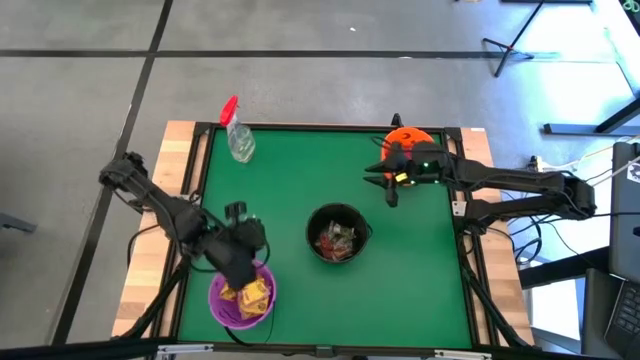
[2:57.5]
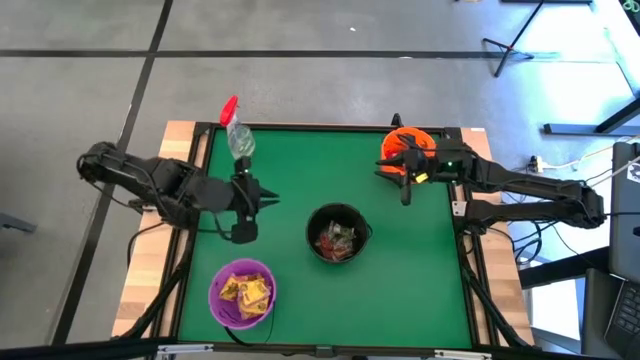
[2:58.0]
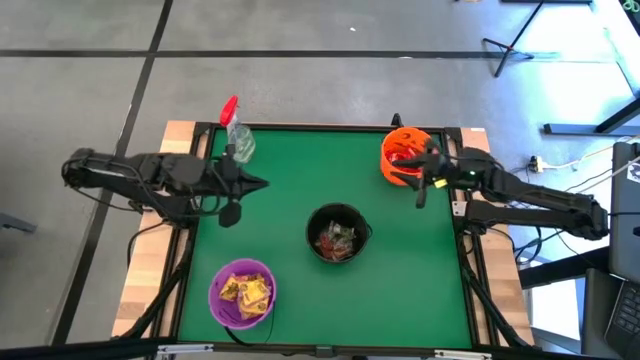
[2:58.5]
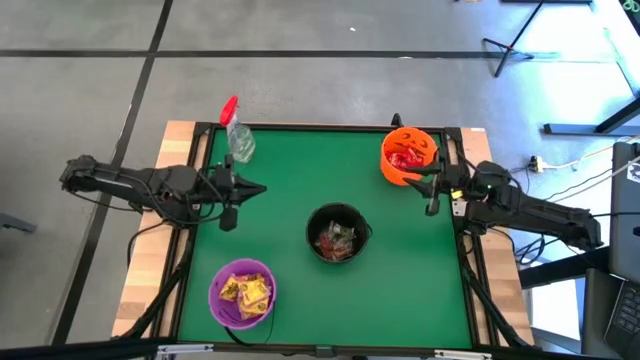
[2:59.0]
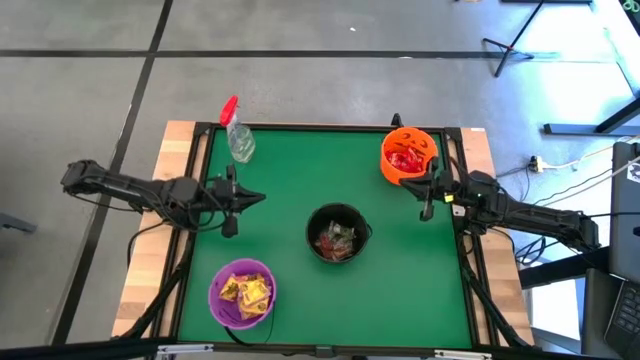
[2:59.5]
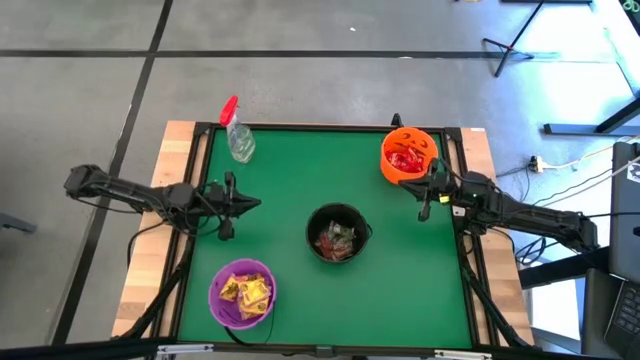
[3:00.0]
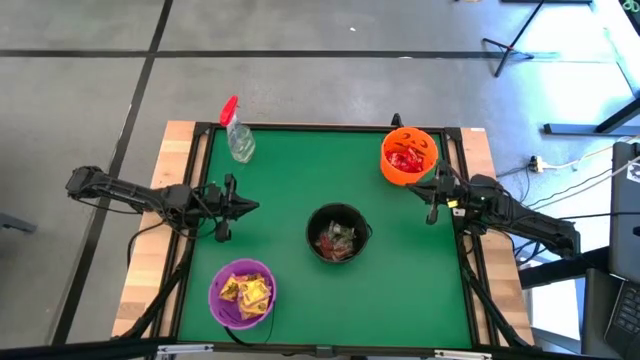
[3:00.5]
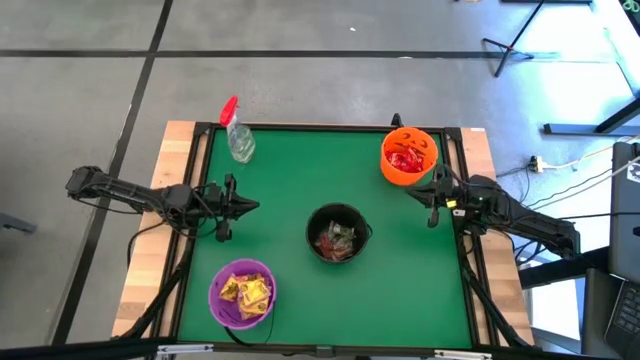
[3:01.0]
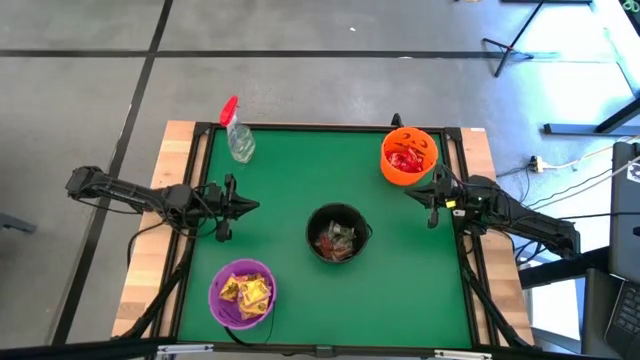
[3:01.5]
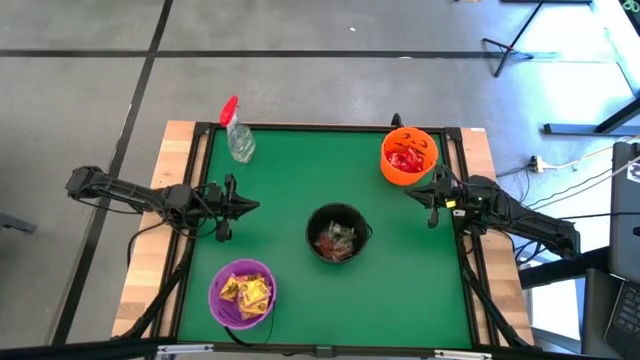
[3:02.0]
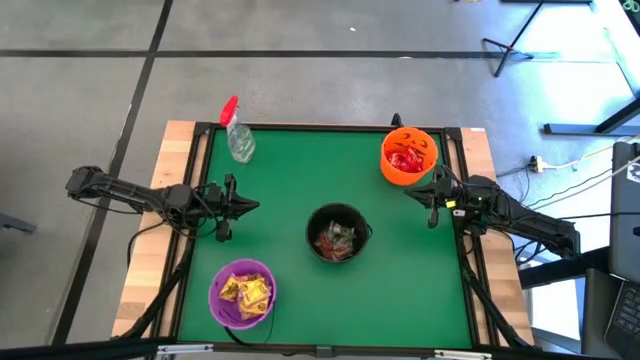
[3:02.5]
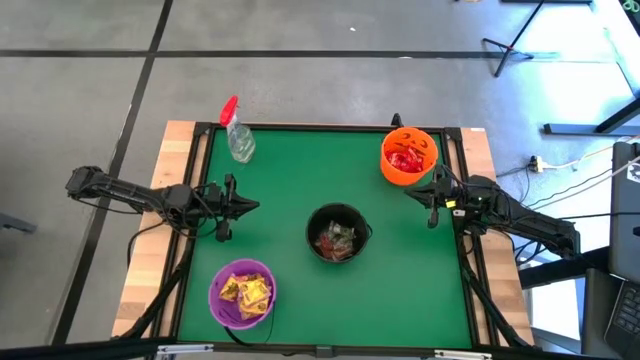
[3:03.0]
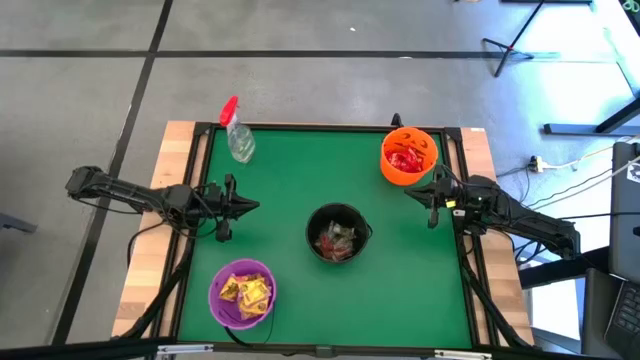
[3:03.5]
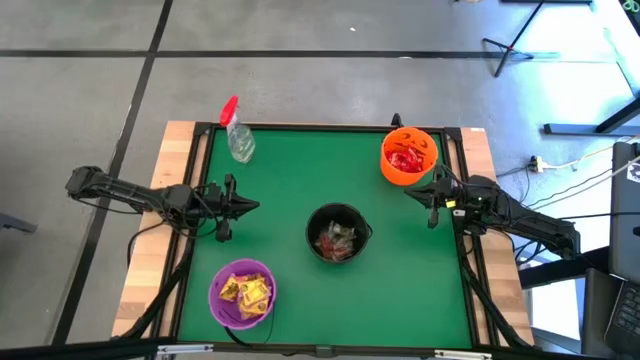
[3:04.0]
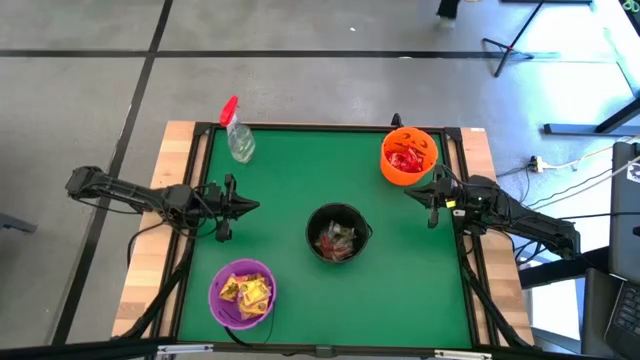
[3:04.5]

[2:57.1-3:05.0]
Task: Sort candy
Return to Home Position

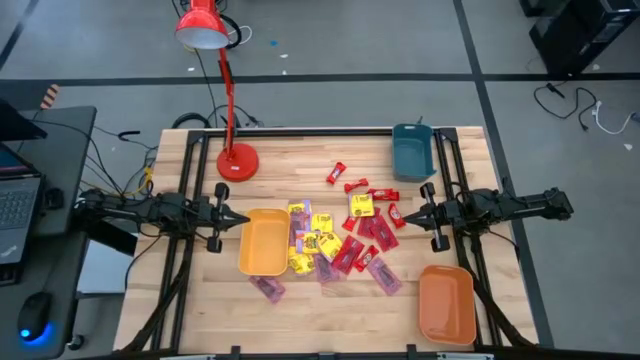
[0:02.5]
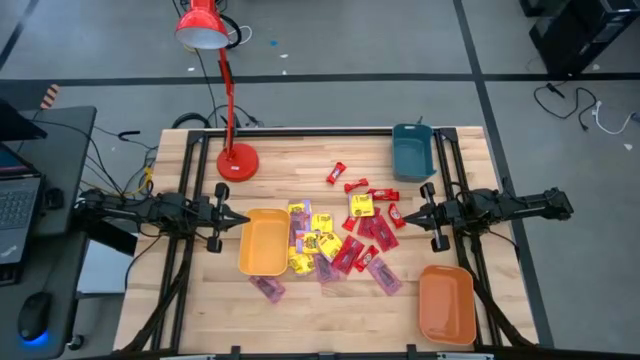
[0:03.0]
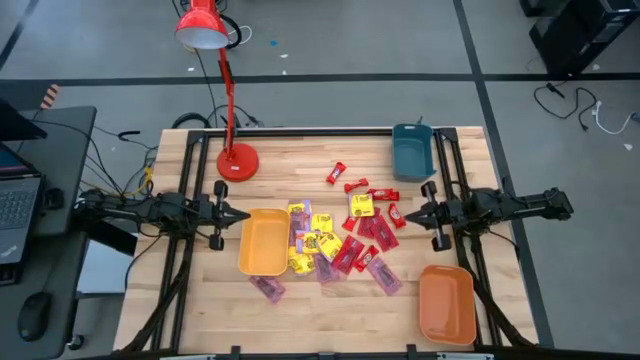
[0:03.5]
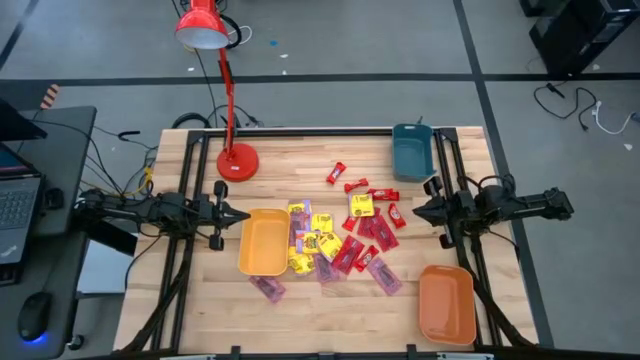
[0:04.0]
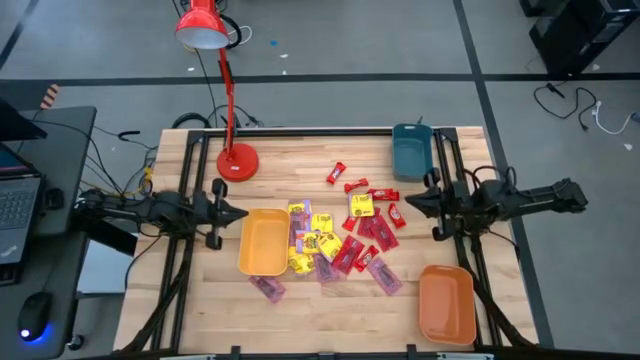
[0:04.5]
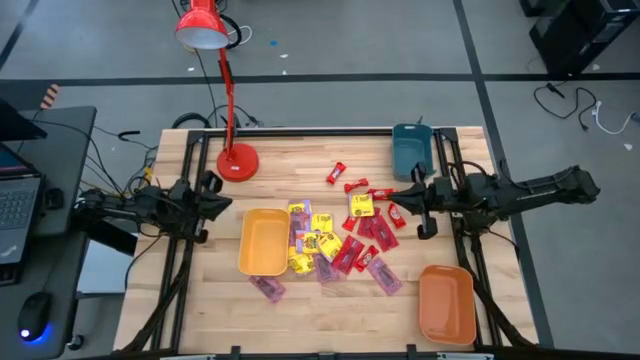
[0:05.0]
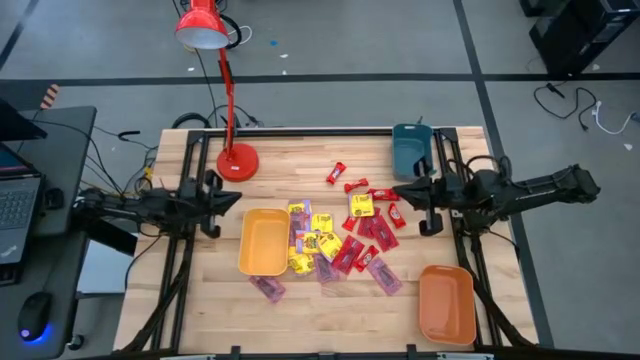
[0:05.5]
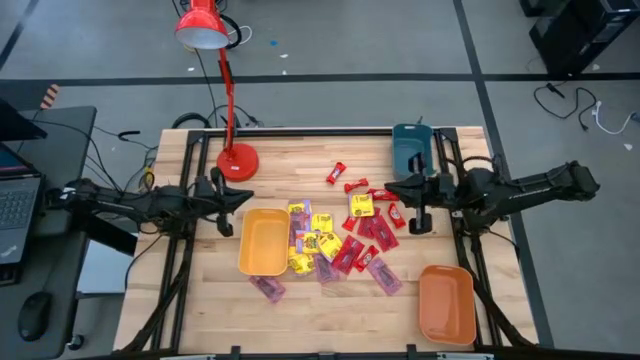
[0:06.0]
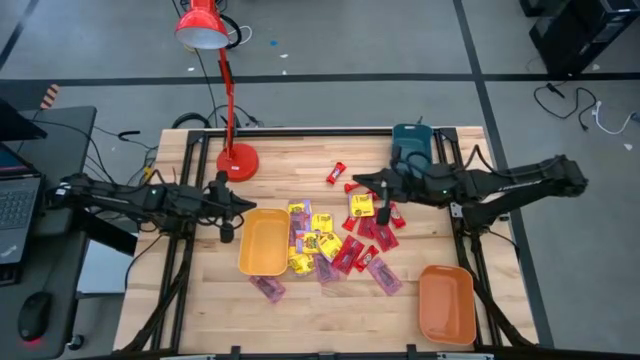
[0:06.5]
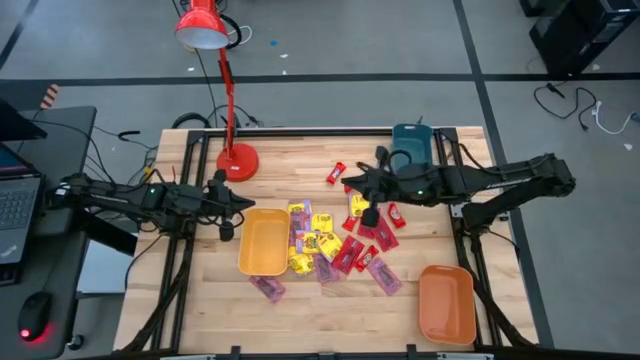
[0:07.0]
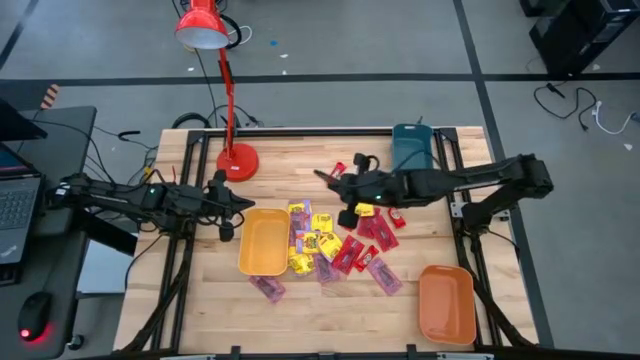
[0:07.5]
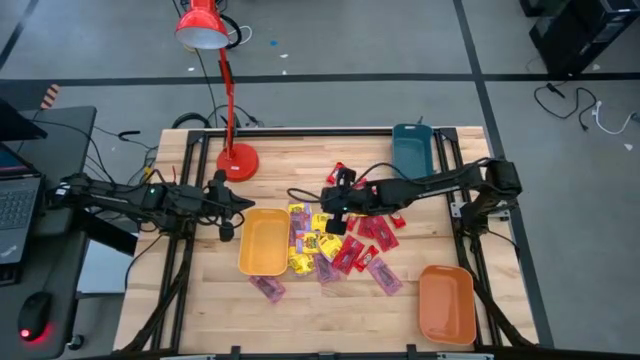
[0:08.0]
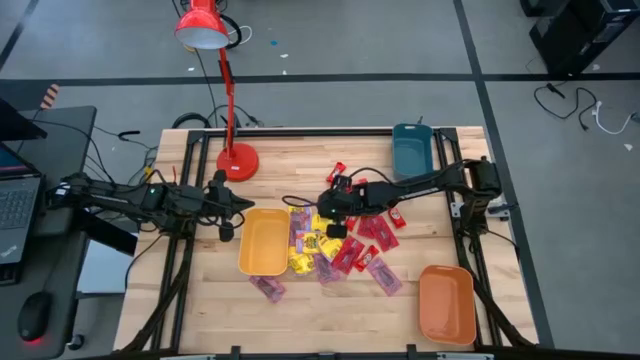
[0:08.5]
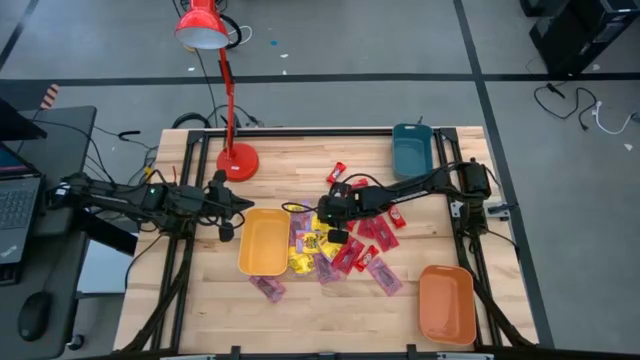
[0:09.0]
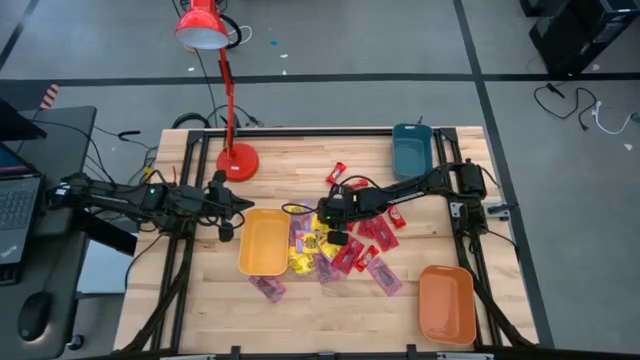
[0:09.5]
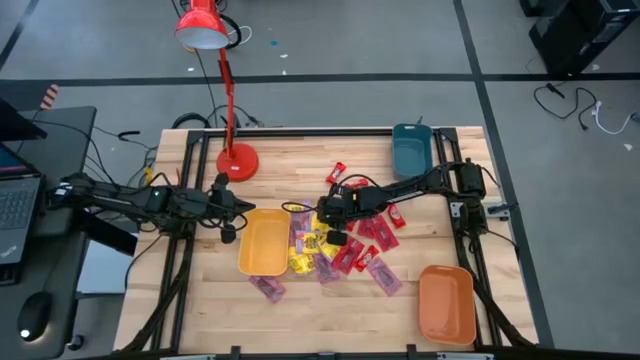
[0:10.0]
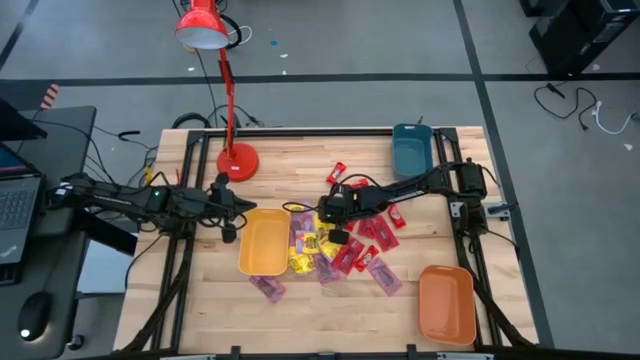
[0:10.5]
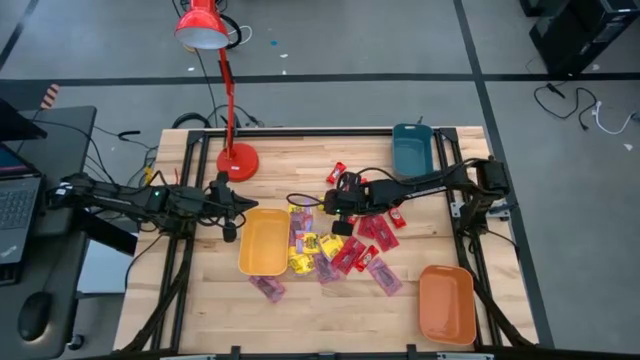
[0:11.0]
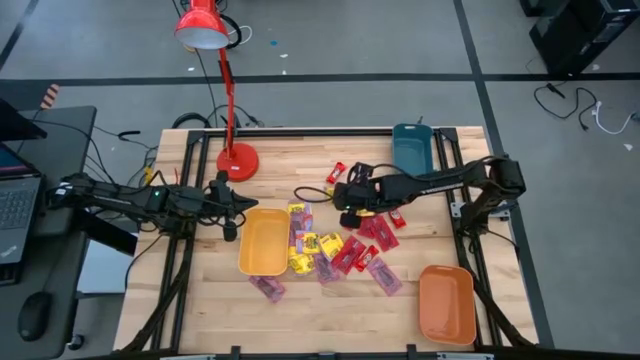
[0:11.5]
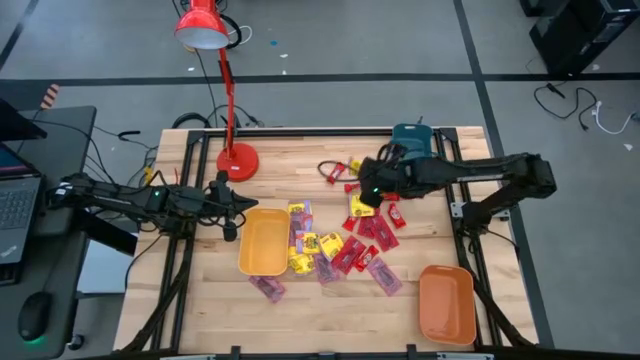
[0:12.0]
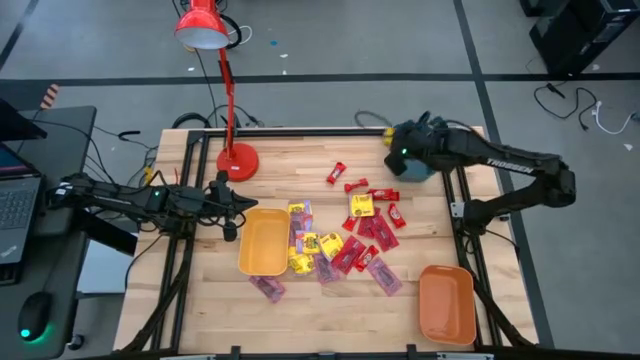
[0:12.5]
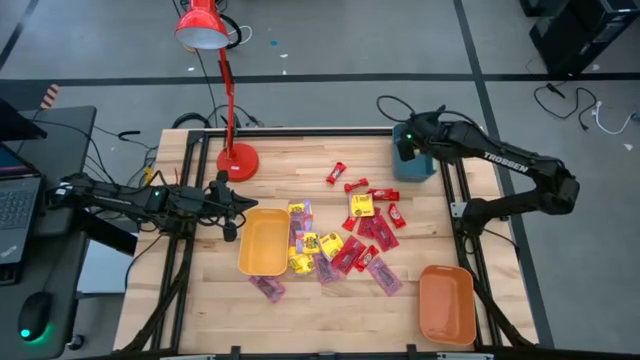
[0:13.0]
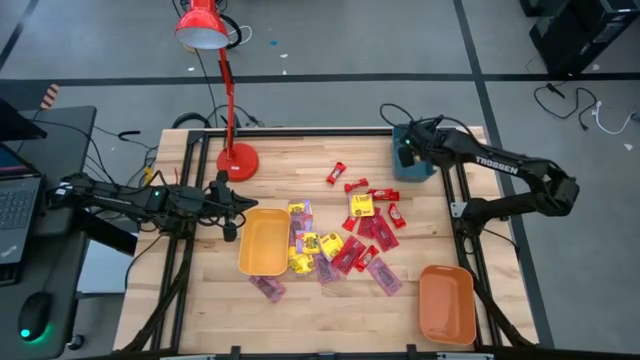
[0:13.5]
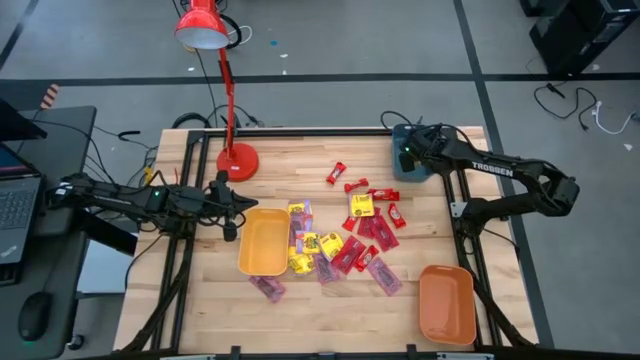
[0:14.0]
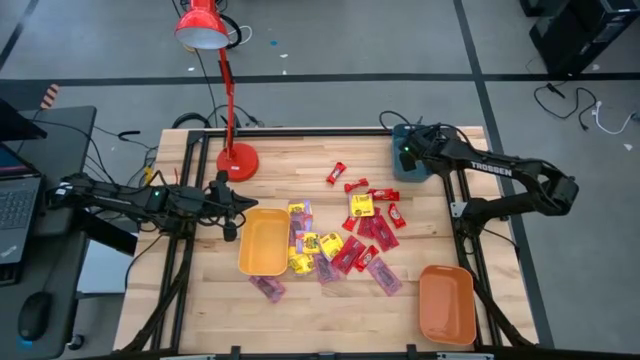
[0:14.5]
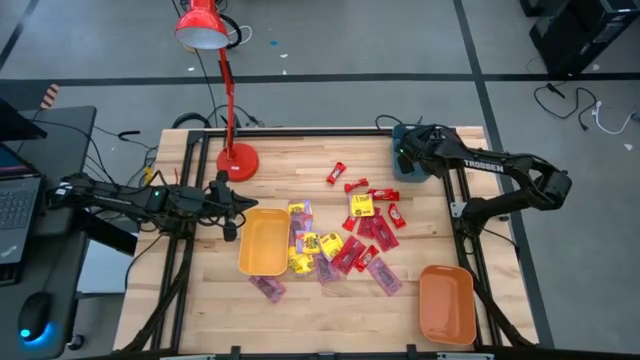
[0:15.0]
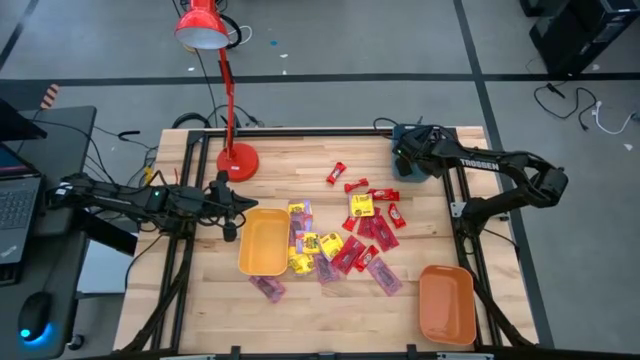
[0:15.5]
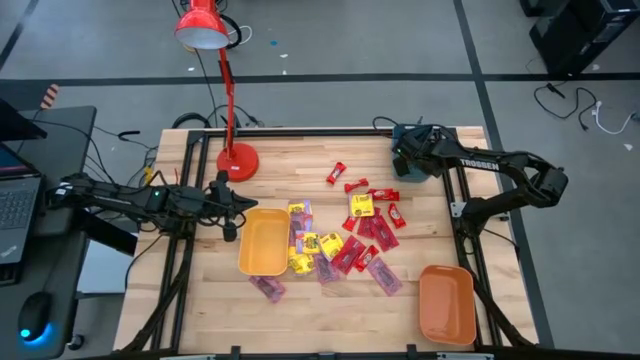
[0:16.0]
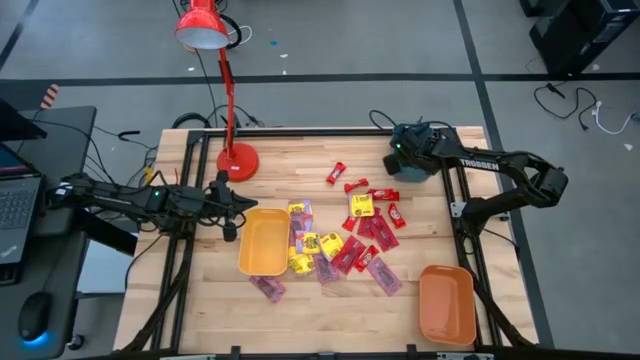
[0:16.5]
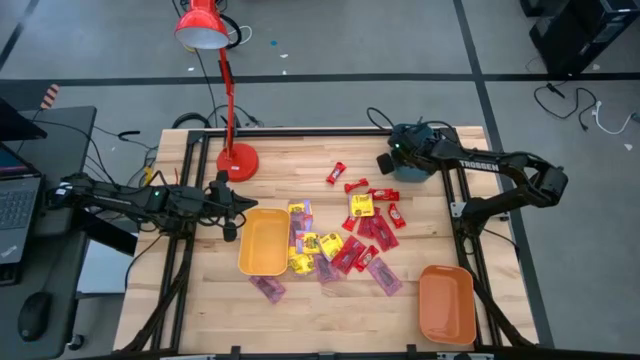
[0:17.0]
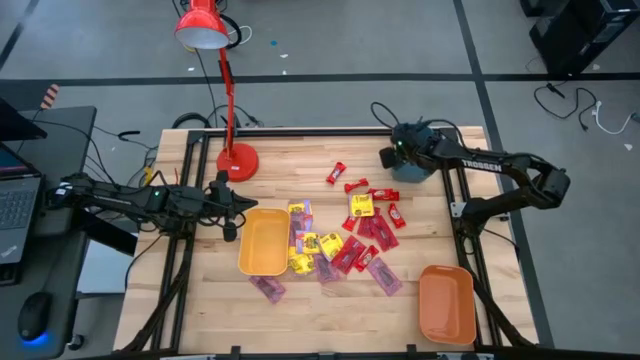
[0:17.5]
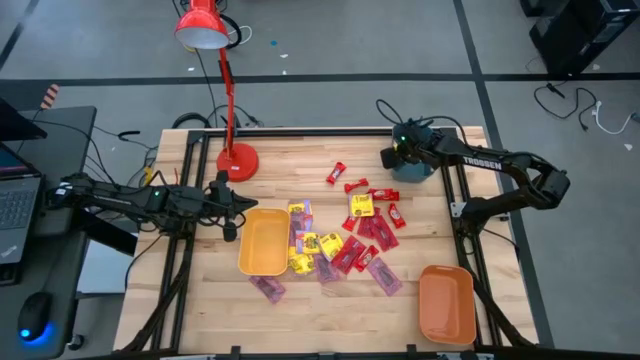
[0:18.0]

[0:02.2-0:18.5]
Task: Sort candy
Put the yellow candy pack into the blue bin
